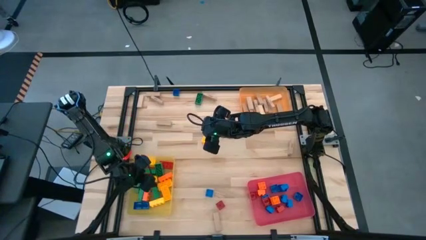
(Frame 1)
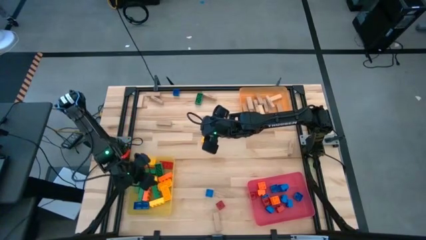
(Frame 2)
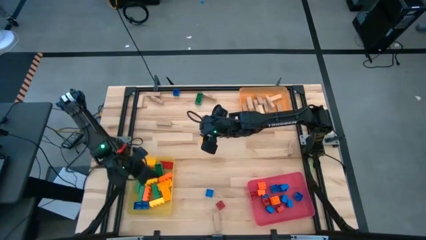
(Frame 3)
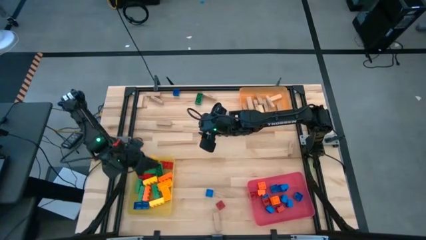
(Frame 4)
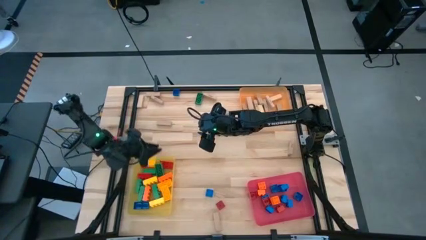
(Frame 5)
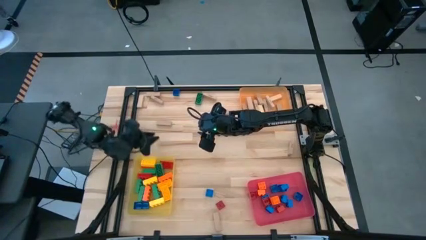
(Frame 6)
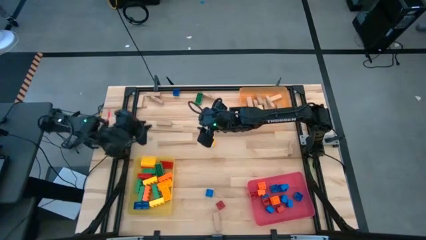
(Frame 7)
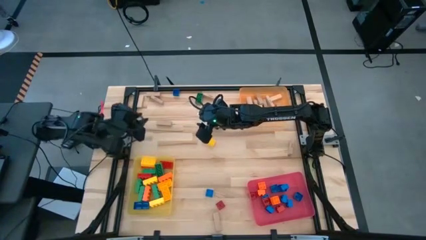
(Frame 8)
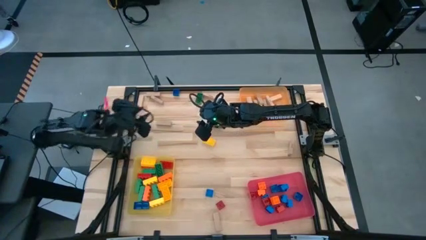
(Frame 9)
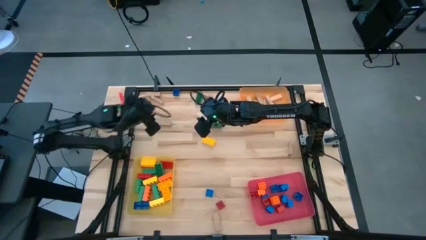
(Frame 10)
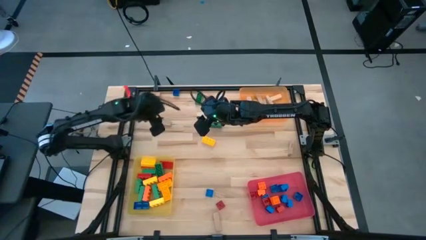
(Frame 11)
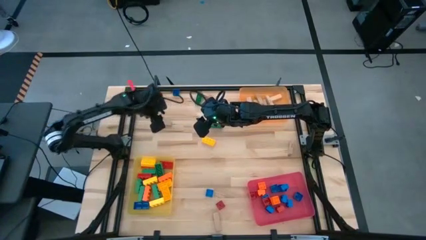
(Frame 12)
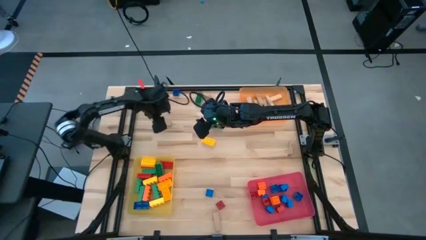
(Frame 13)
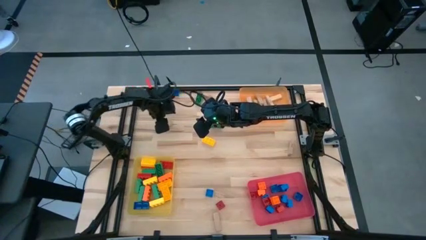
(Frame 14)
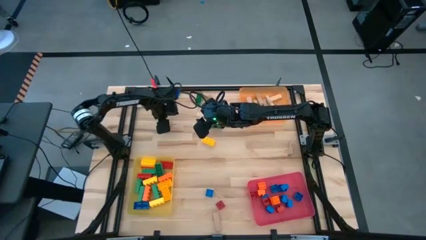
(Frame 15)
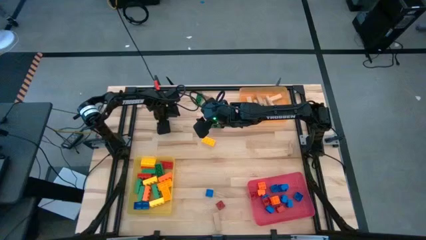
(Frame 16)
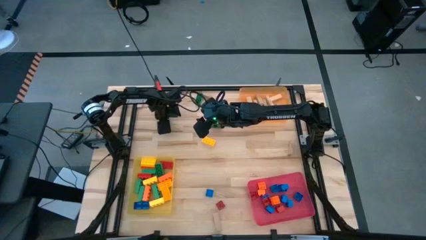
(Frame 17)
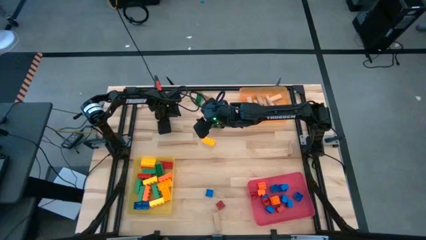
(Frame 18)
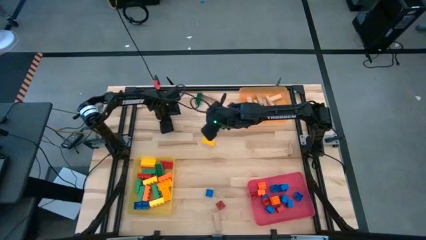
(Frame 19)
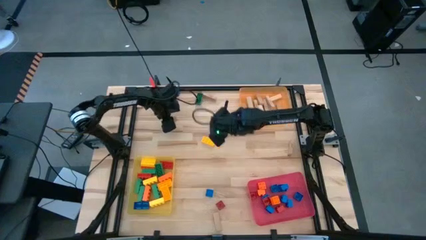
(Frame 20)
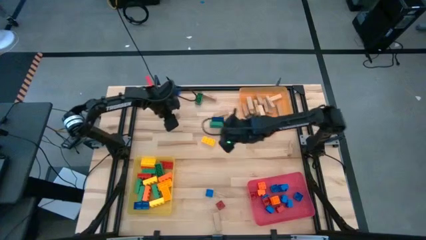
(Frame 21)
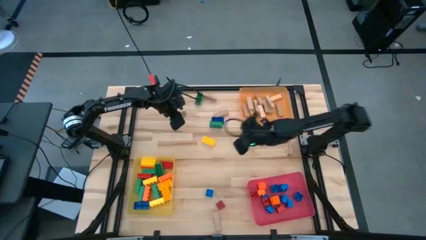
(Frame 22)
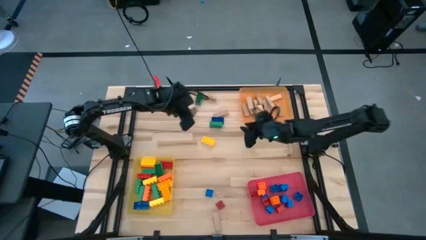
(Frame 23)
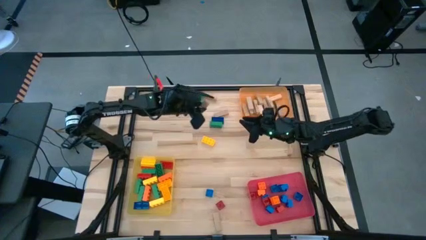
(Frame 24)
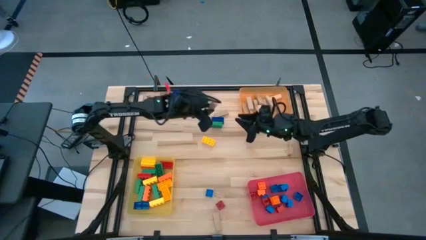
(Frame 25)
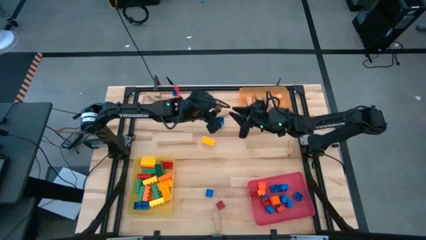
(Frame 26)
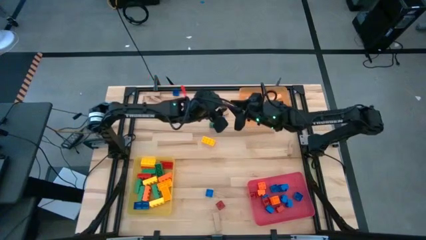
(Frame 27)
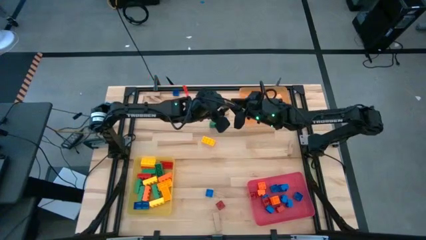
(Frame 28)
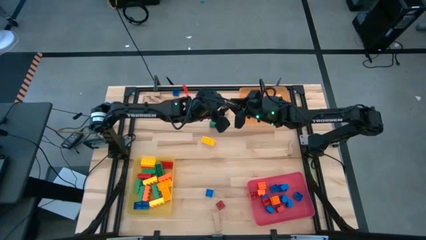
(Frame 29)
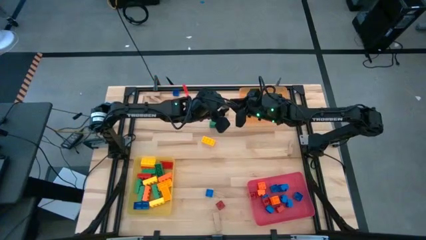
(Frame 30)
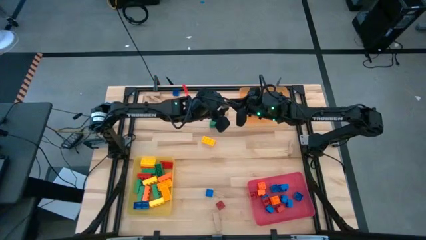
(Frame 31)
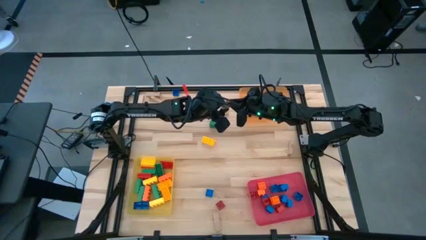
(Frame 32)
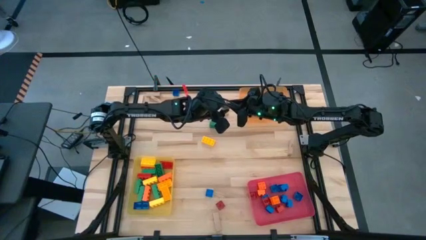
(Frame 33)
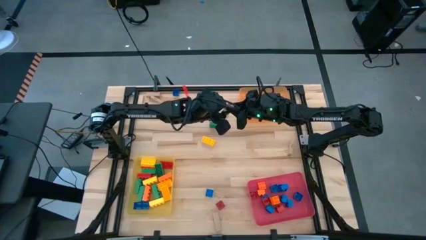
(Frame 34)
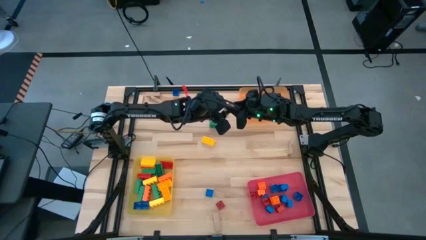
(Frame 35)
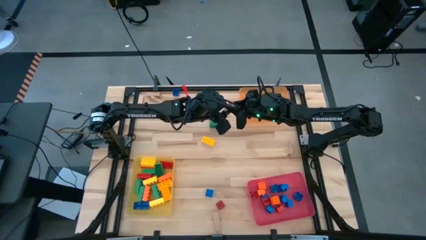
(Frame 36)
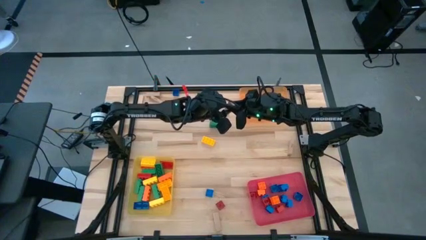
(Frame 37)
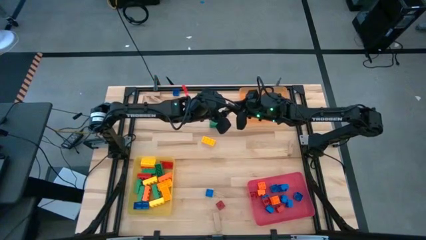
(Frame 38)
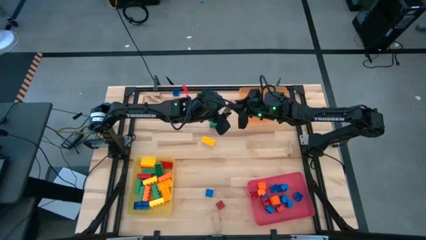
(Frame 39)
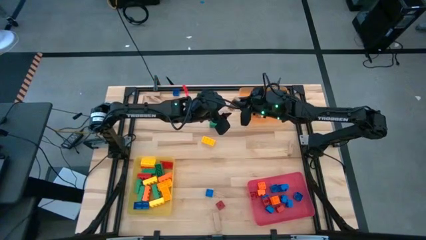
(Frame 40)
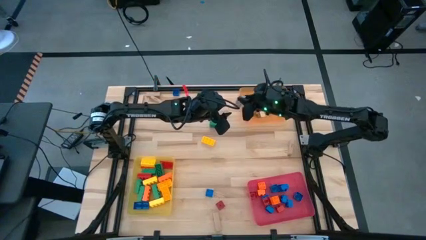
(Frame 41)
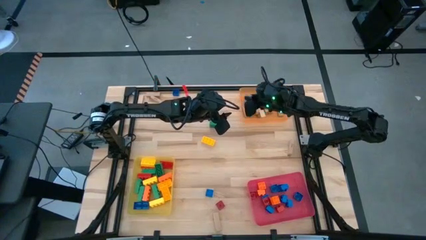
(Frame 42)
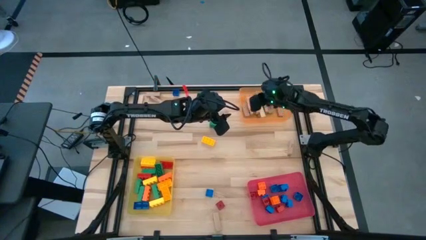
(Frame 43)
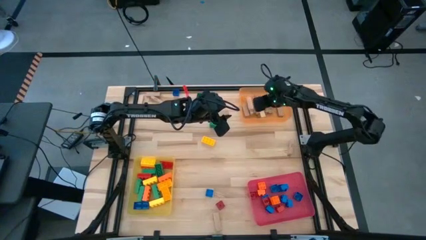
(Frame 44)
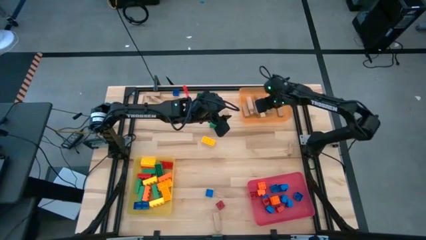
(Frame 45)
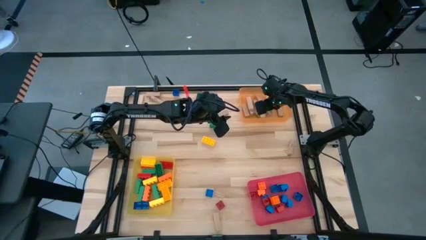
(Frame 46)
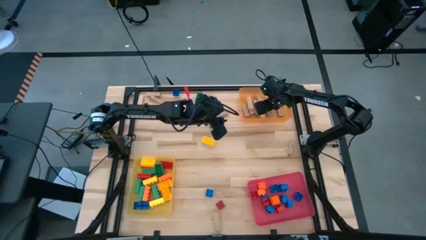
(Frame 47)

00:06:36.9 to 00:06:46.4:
Task: Sort blocks by size
Put the brown block into the orange bin

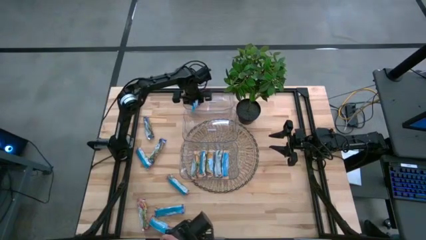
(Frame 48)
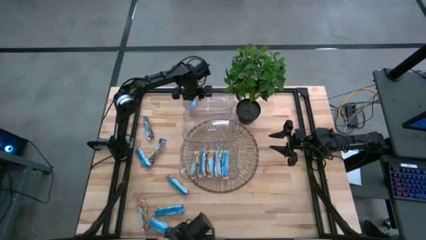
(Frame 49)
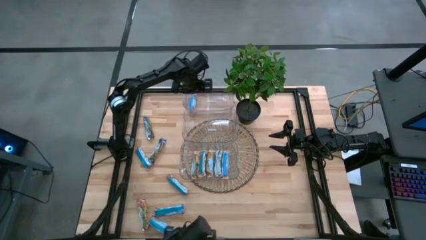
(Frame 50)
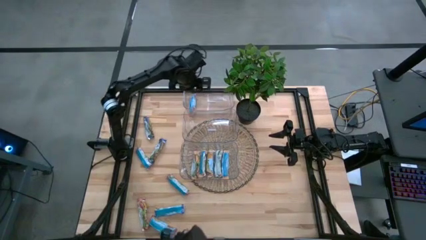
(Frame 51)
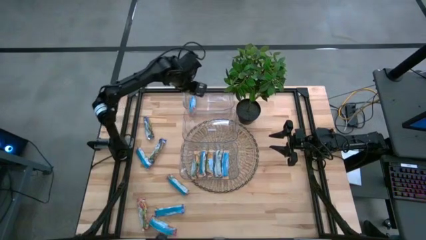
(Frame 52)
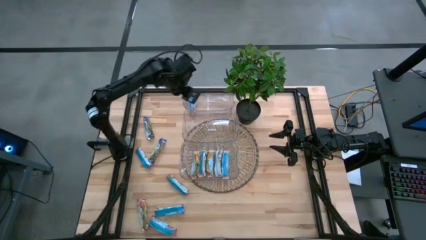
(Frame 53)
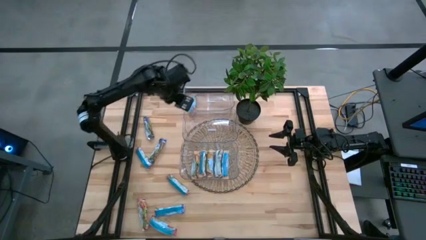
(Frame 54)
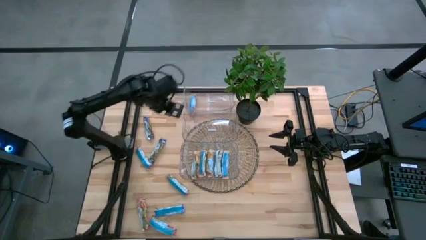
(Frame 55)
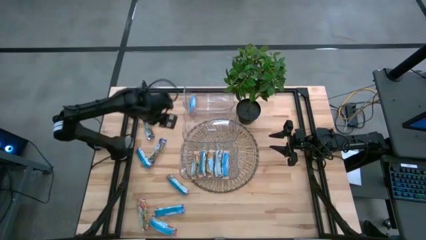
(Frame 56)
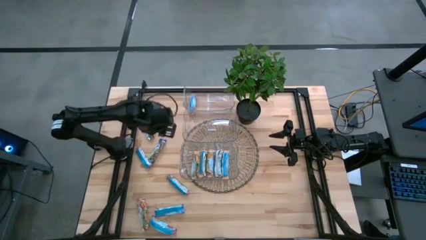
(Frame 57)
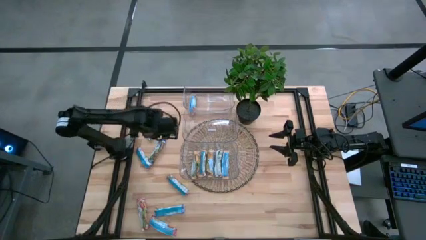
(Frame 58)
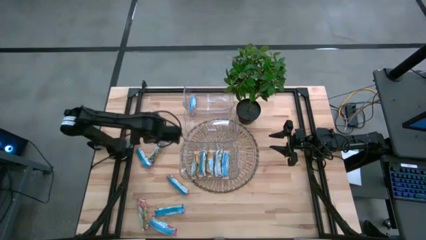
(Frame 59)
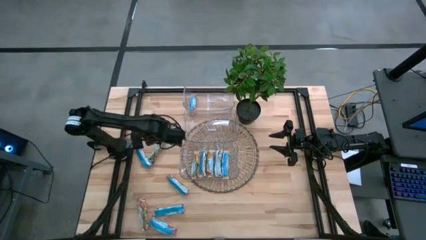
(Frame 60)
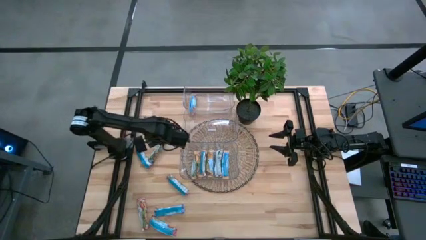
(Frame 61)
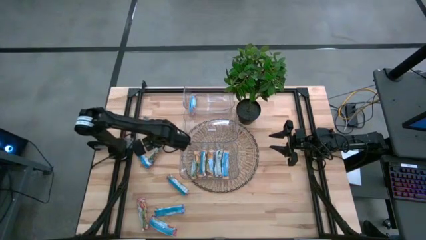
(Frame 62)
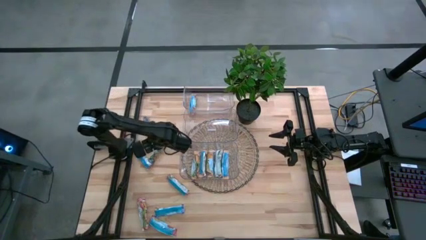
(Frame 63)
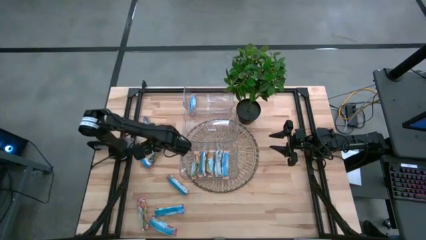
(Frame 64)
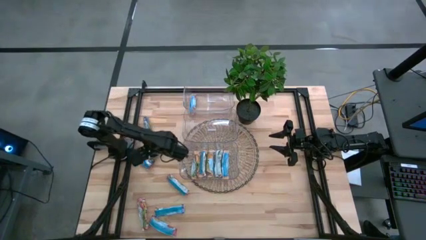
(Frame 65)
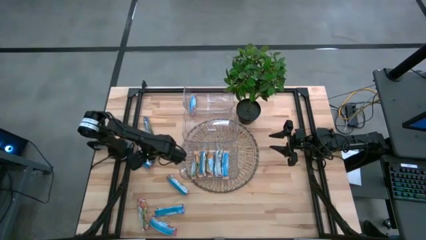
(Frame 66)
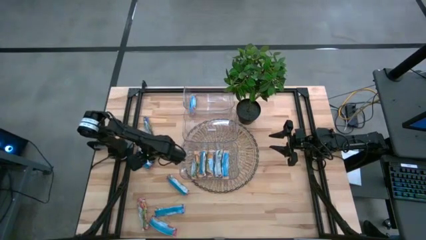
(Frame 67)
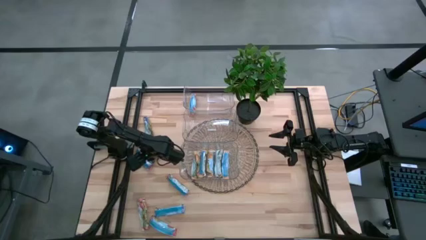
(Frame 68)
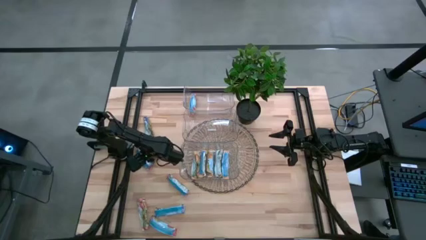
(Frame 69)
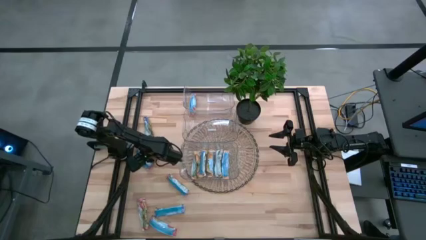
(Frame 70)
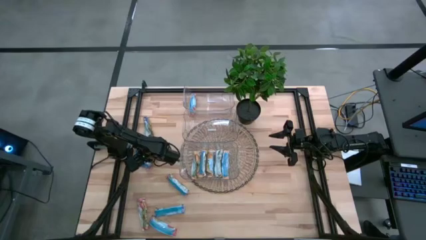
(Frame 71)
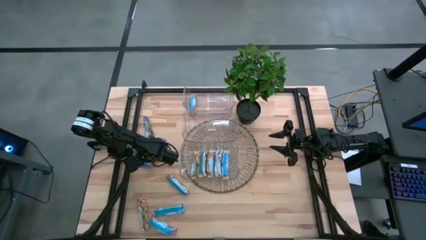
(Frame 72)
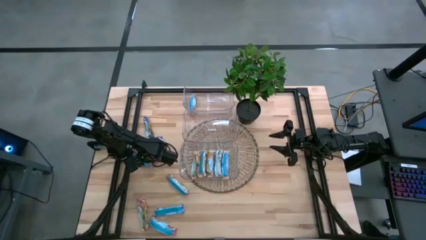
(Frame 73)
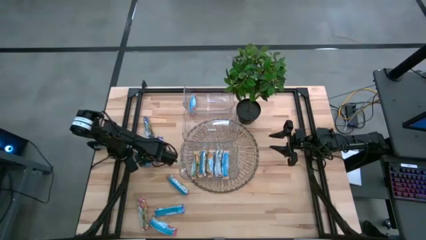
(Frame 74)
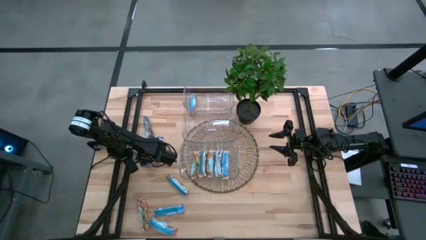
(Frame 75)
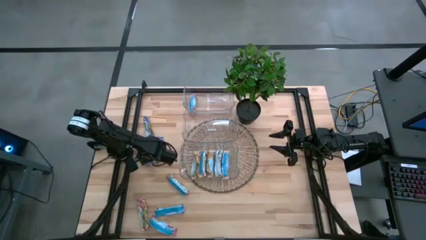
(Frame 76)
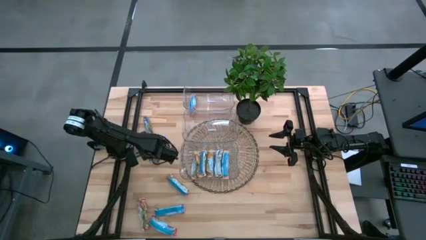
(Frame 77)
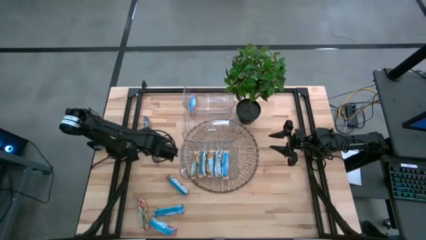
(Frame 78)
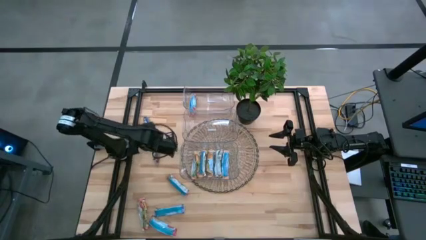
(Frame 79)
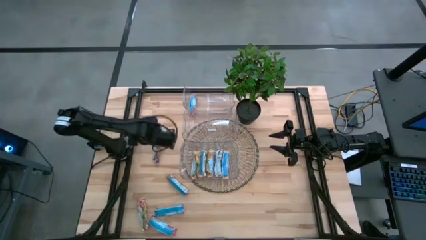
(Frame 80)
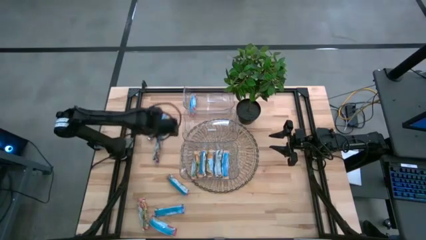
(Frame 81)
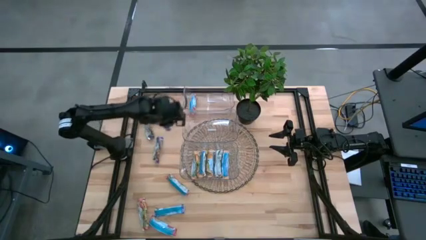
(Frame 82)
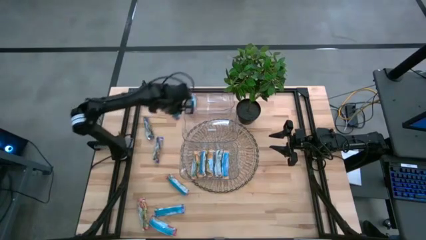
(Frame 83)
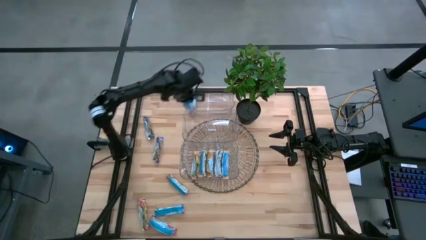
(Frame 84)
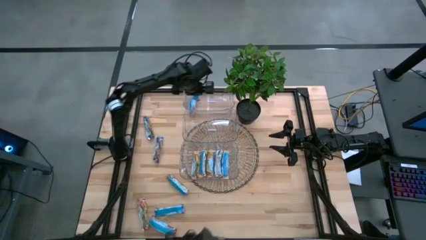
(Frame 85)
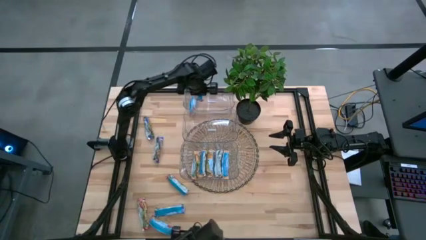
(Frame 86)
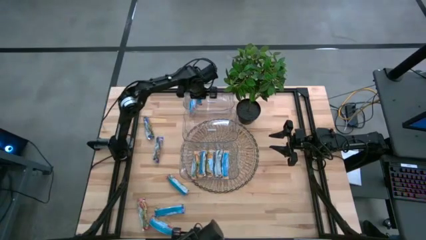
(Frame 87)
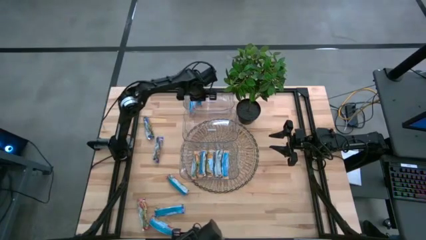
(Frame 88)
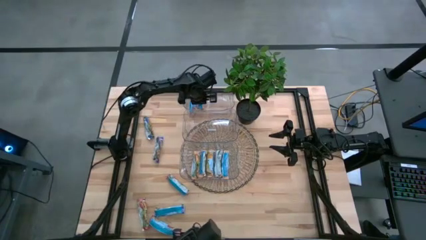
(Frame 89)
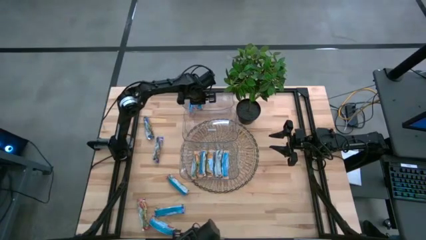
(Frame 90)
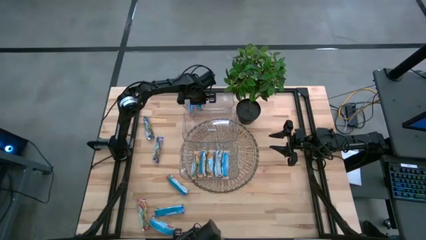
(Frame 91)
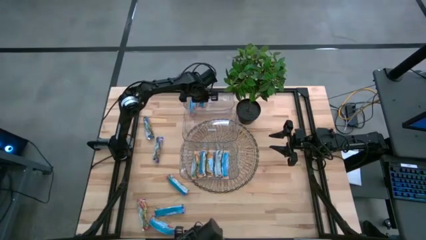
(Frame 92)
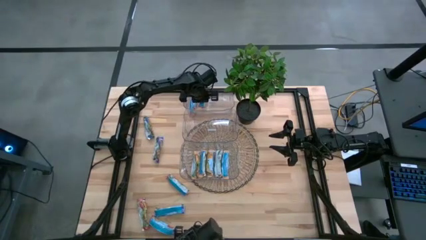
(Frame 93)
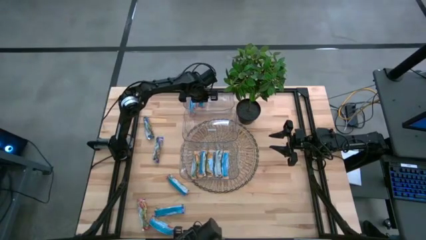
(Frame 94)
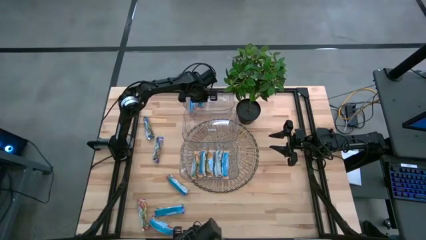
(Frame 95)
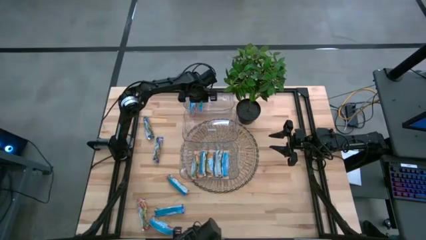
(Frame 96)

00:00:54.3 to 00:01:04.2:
Task: Pick and place Granola Bars by type
Put the red granola bar into the top transparent bin
